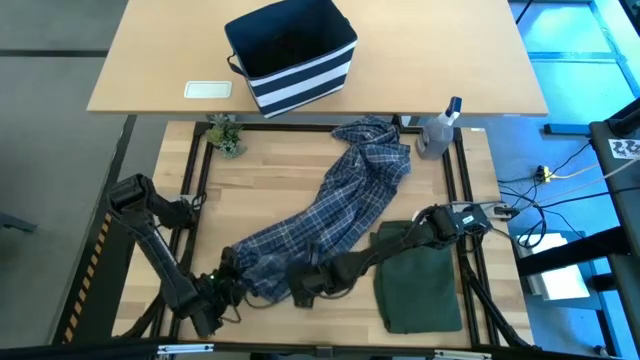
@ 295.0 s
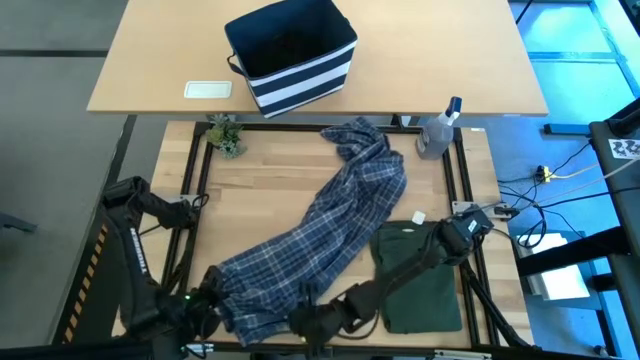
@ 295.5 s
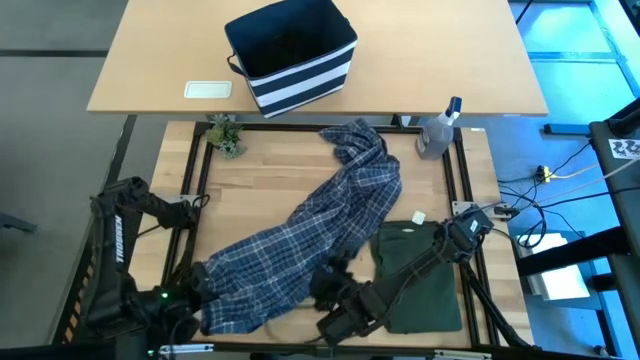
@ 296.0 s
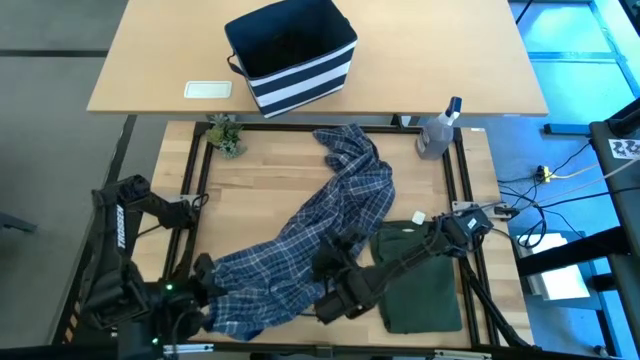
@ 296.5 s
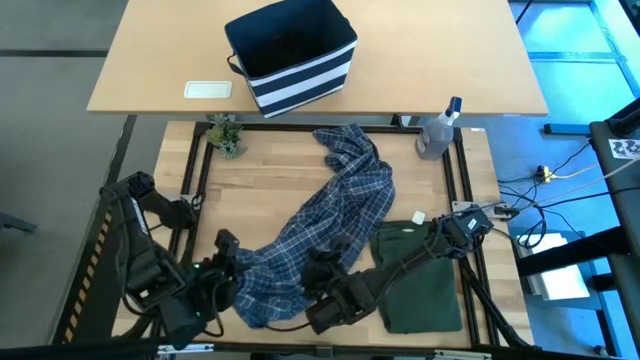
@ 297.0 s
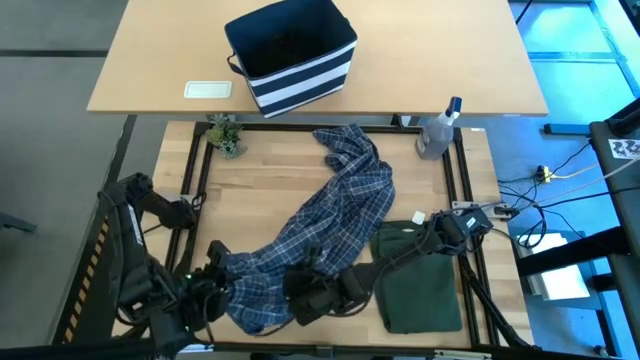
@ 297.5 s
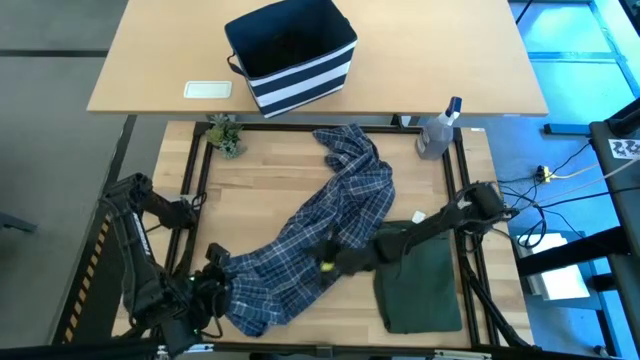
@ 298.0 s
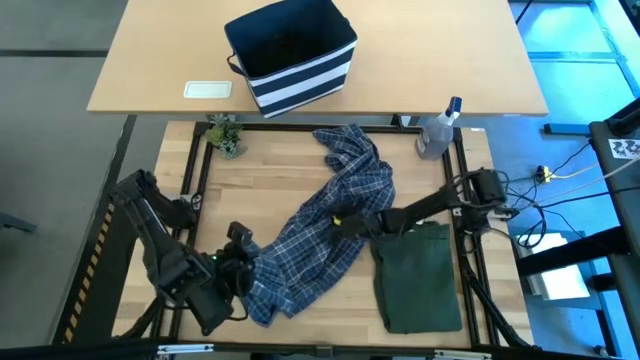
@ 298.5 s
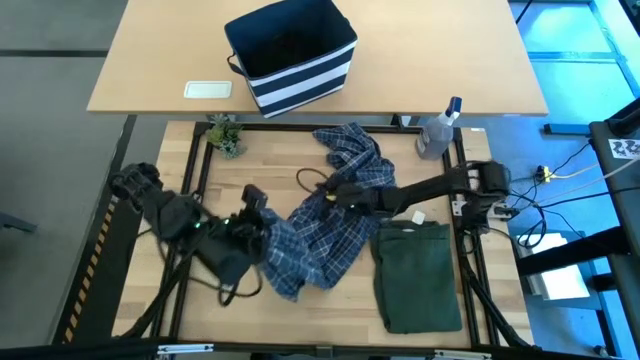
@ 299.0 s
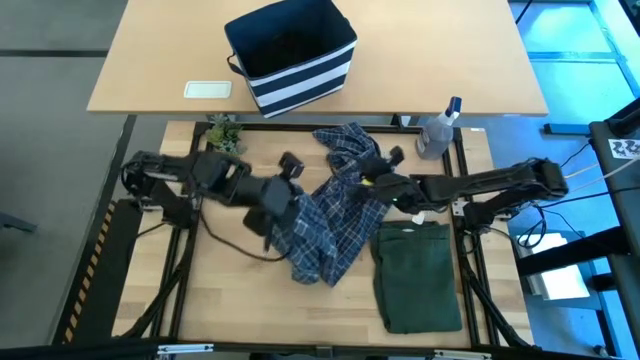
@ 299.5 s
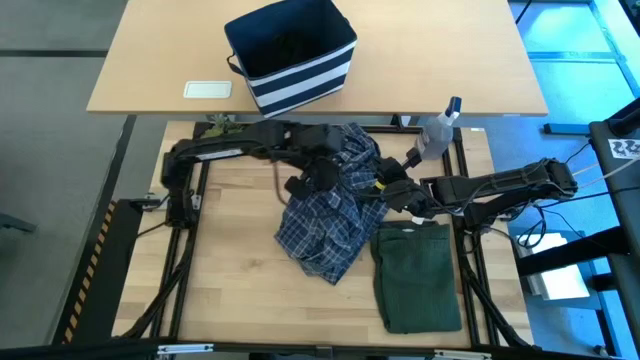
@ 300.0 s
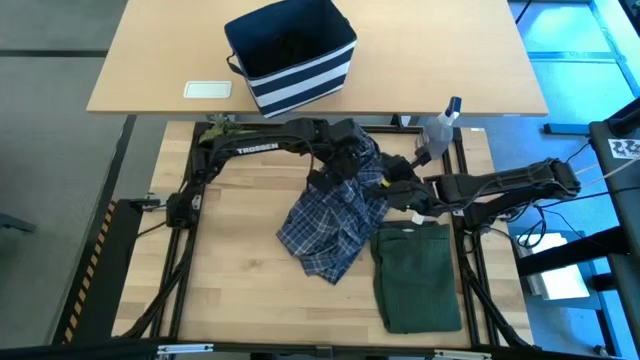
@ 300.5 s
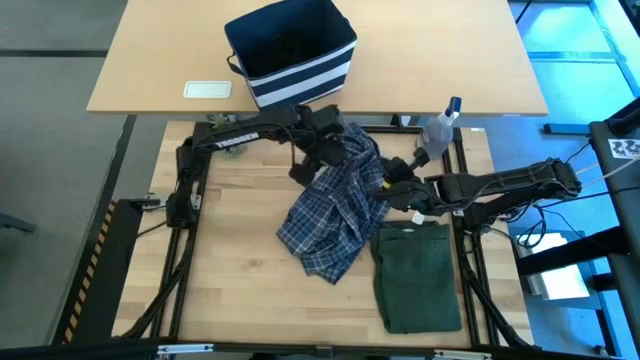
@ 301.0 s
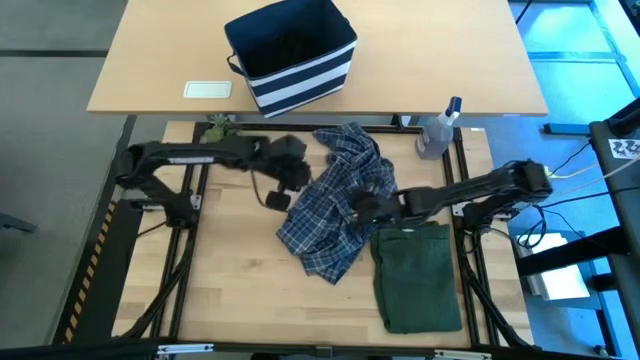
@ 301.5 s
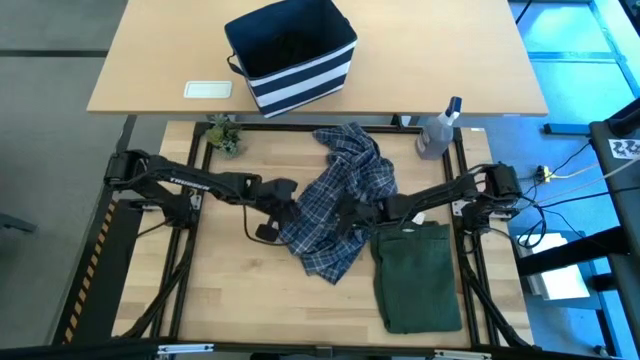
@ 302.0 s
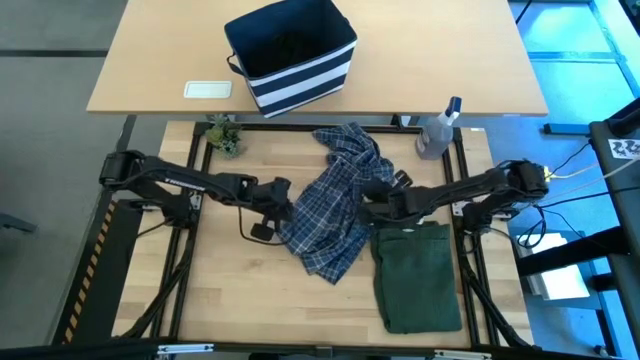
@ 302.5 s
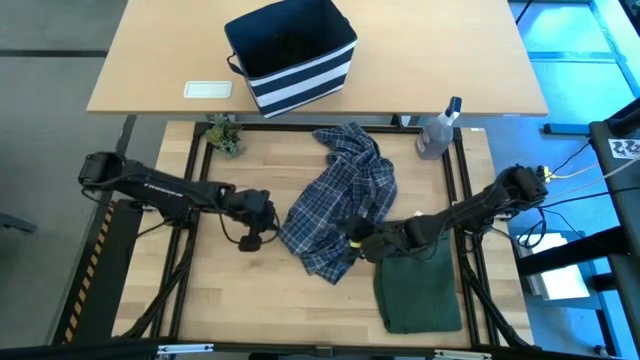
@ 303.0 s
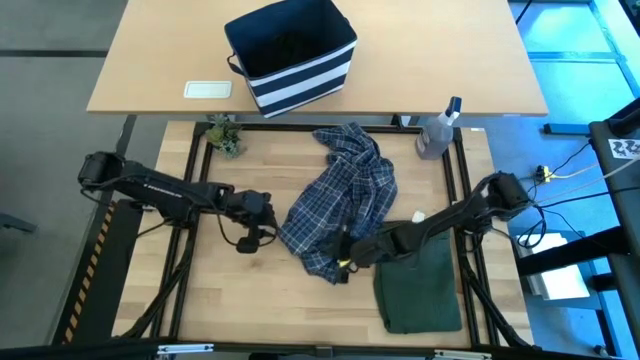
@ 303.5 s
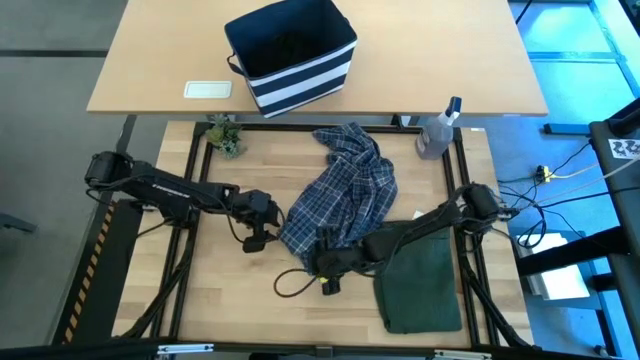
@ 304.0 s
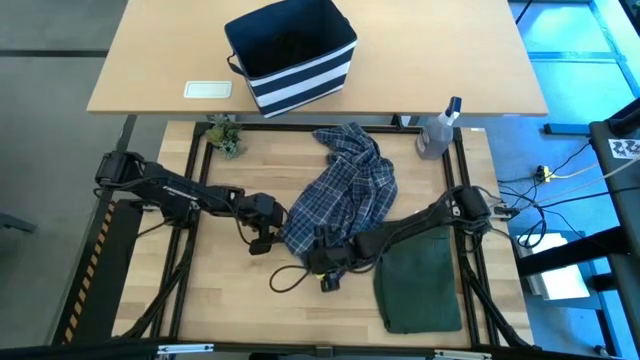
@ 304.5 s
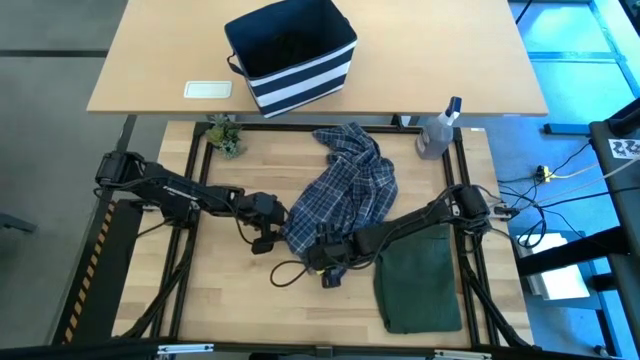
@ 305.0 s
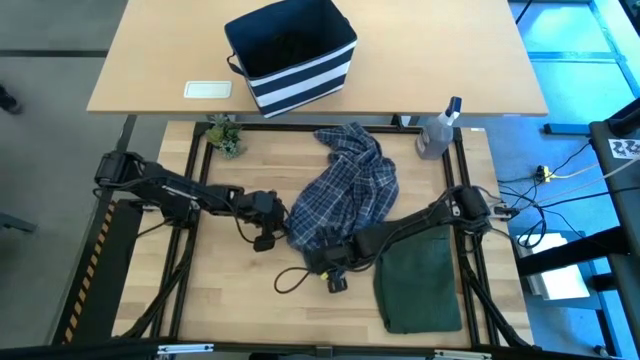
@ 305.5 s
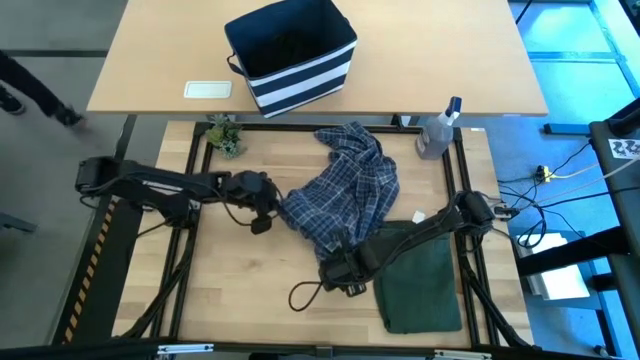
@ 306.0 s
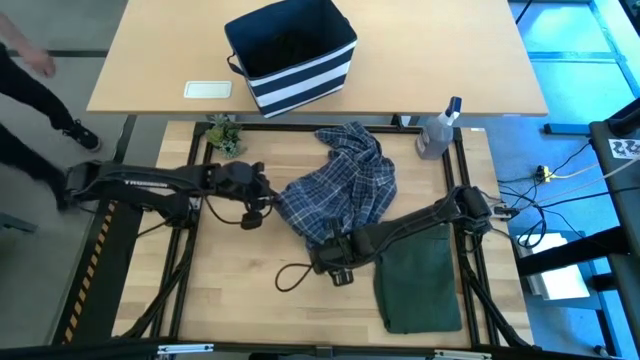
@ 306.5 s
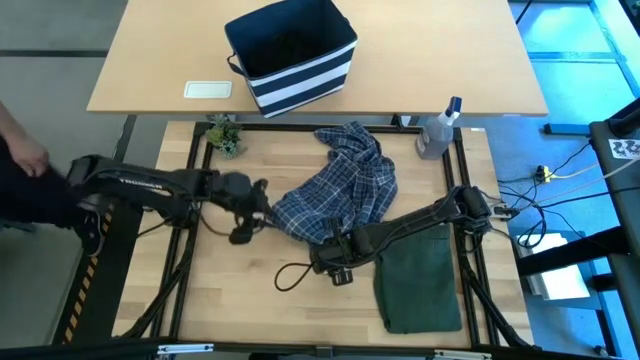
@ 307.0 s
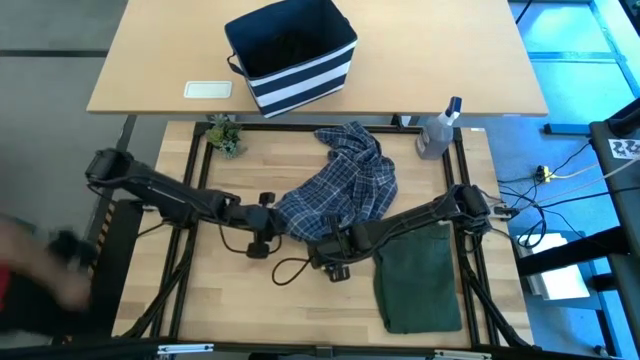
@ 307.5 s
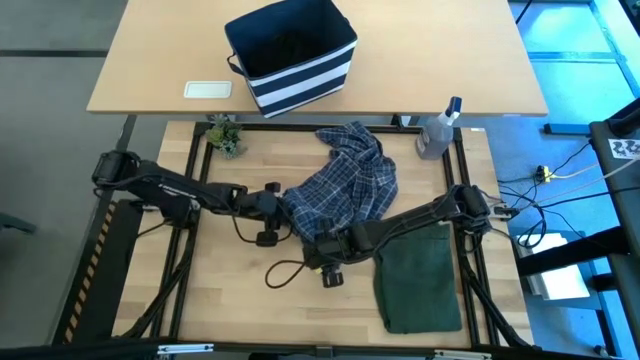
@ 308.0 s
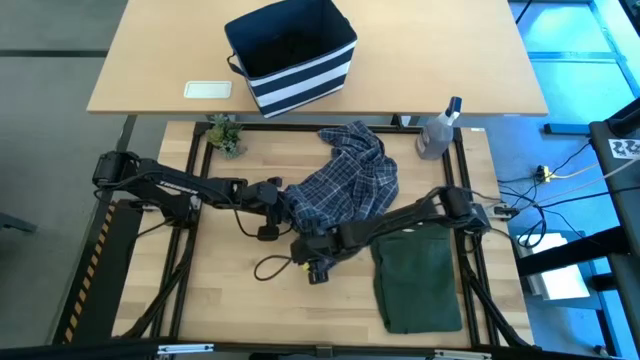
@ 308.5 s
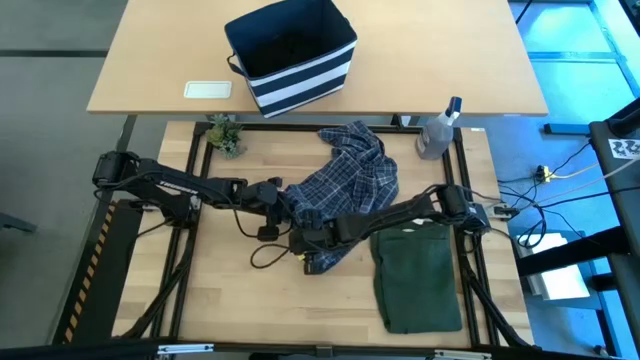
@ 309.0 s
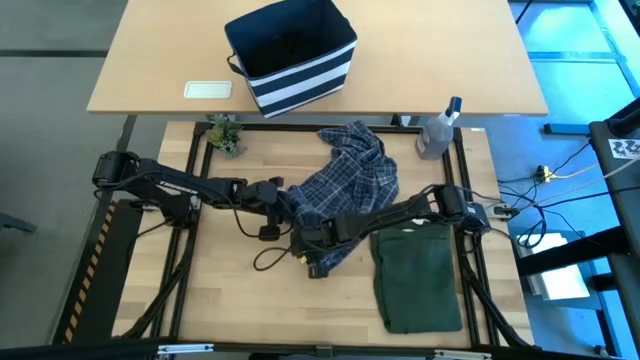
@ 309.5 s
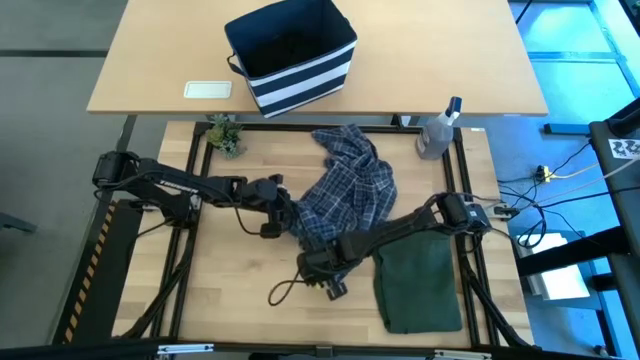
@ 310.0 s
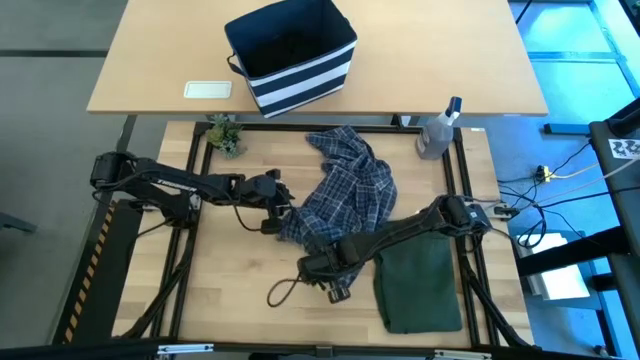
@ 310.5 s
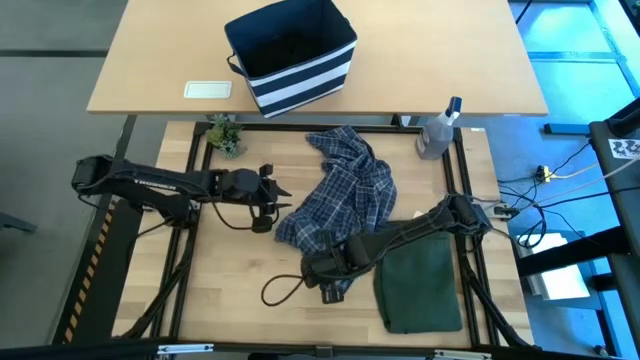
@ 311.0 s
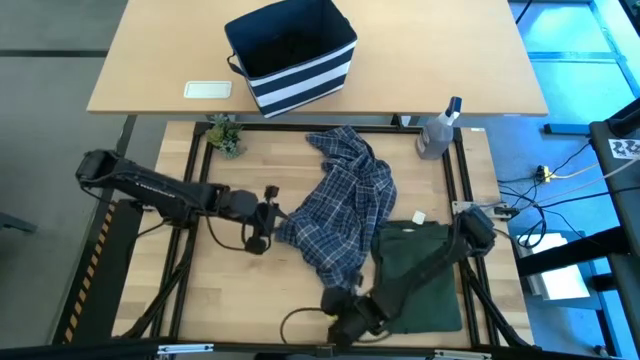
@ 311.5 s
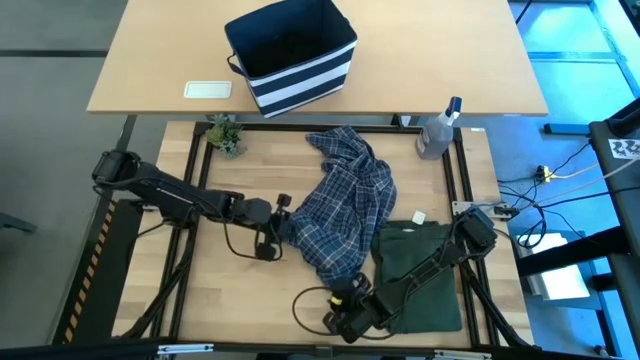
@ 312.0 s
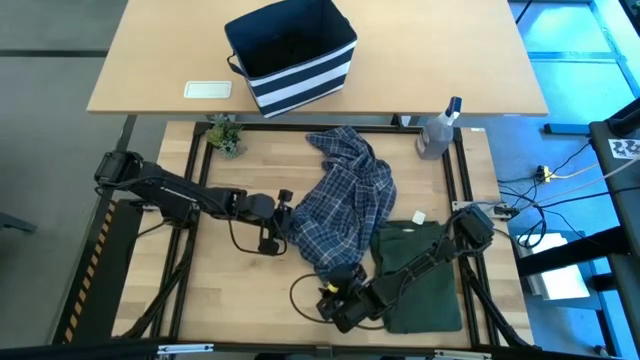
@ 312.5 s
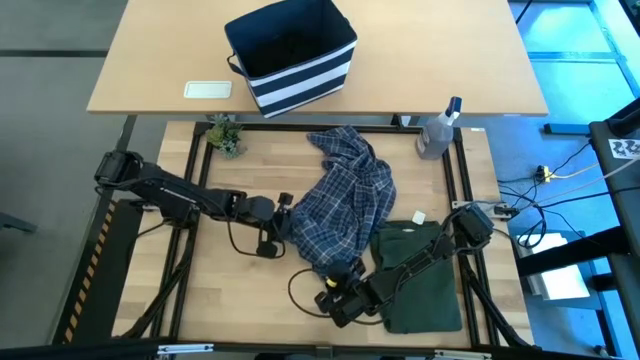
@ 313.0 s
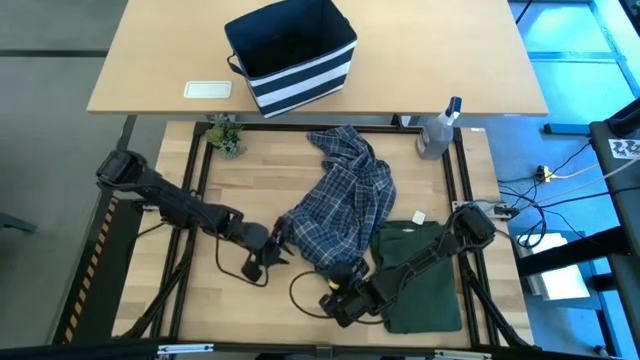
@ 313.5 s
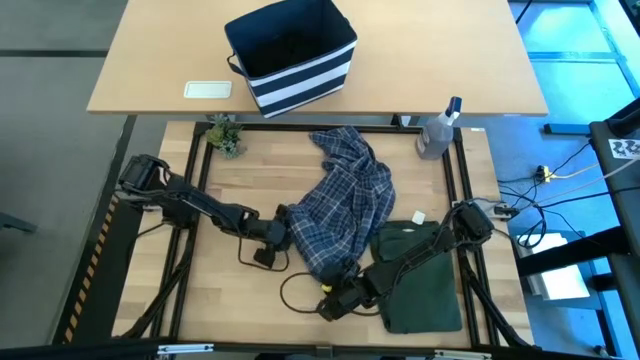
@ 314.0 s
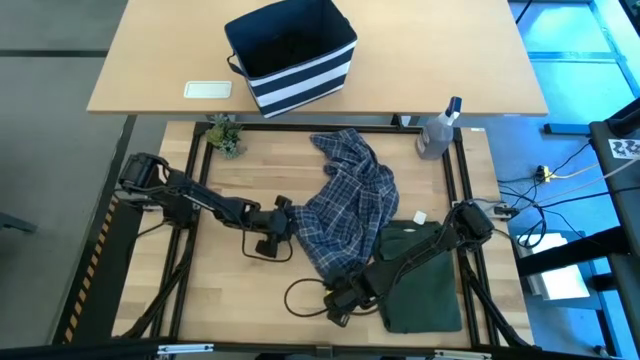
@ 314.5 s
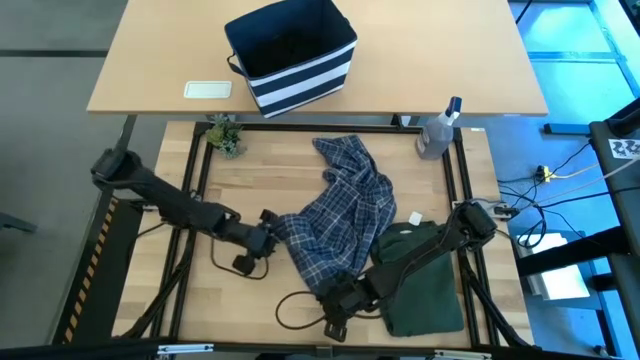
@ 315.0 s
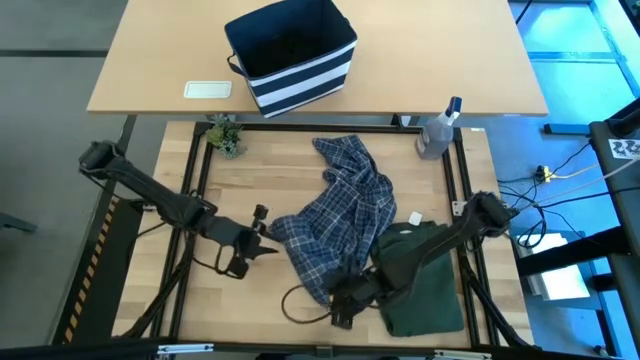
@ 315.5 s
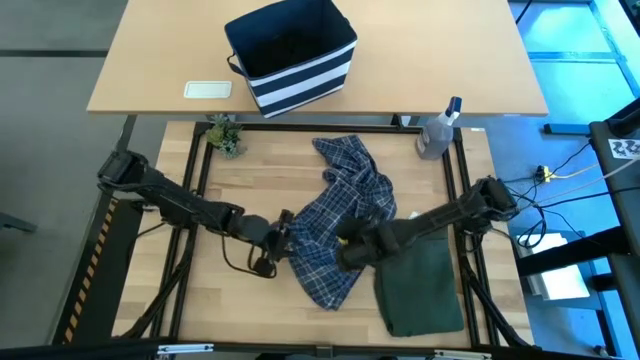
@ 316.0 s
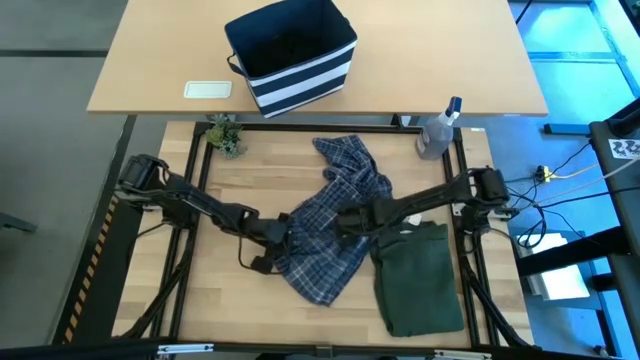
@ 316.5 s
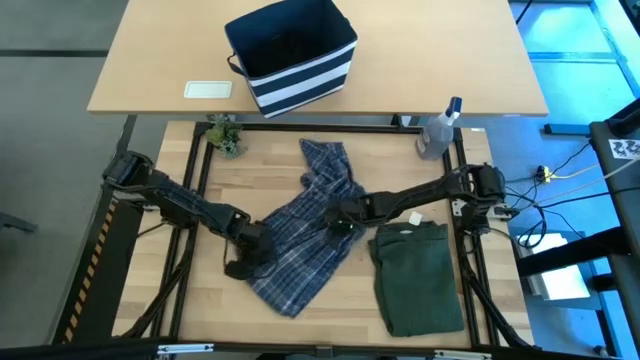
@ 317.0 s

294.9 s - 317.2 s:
Task: Fold Laundry from Bin
Fold the blue checkered pants
